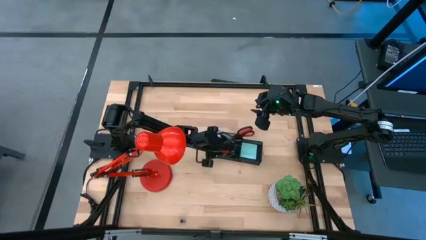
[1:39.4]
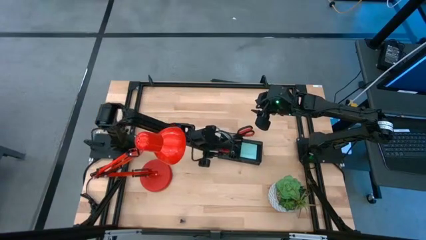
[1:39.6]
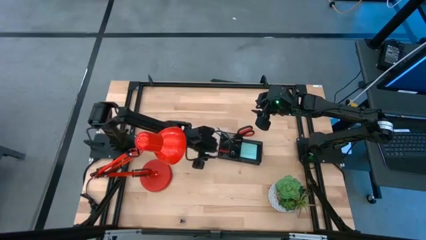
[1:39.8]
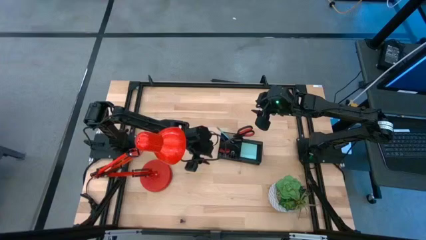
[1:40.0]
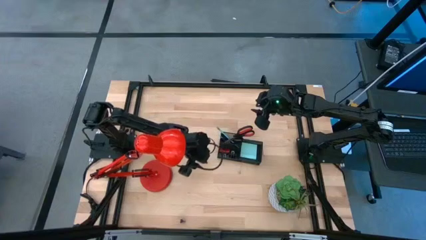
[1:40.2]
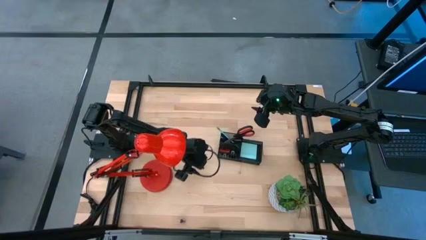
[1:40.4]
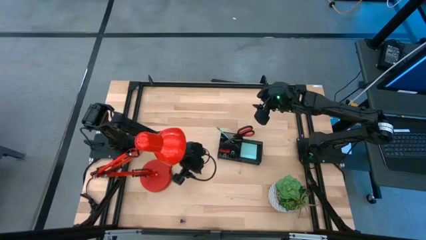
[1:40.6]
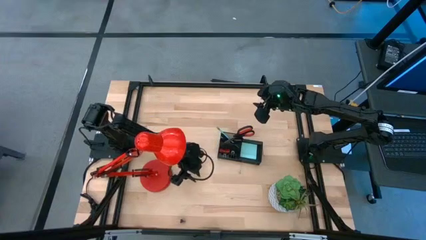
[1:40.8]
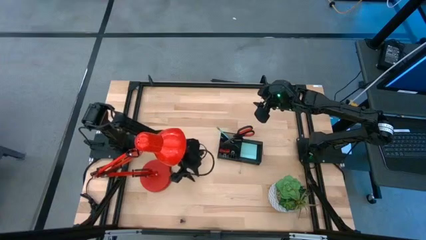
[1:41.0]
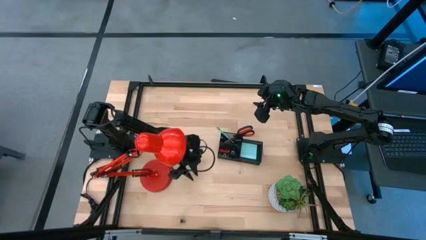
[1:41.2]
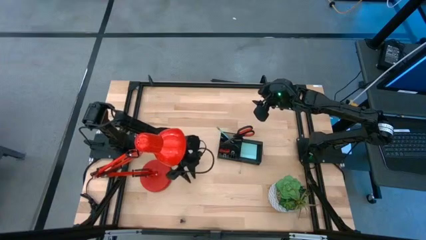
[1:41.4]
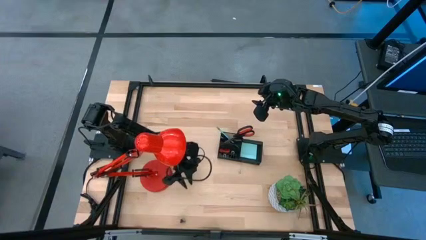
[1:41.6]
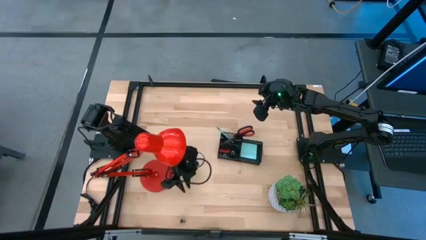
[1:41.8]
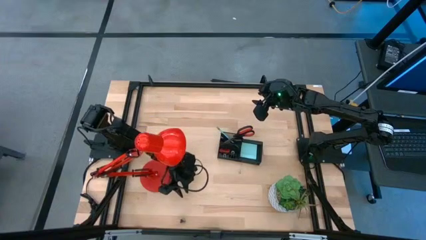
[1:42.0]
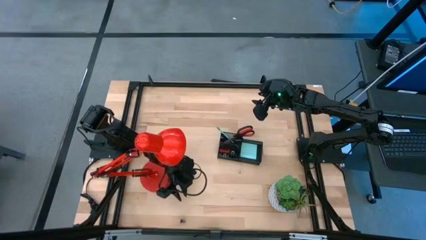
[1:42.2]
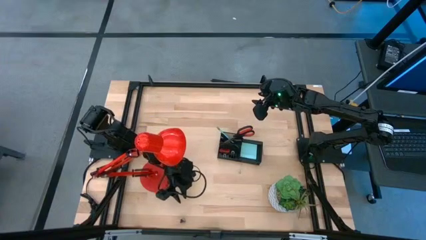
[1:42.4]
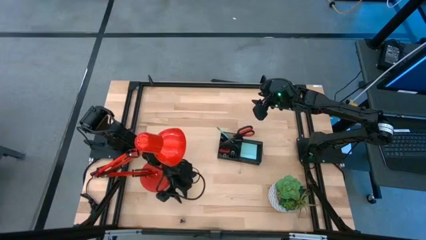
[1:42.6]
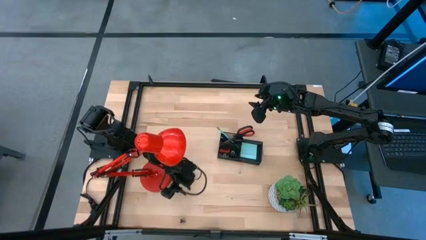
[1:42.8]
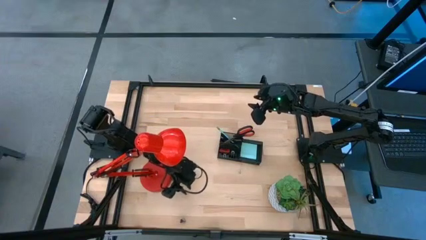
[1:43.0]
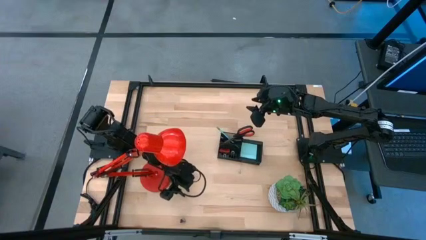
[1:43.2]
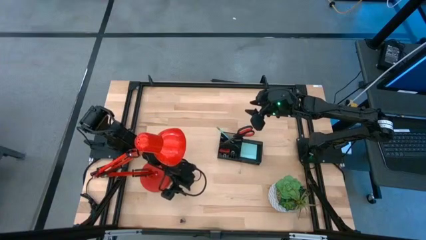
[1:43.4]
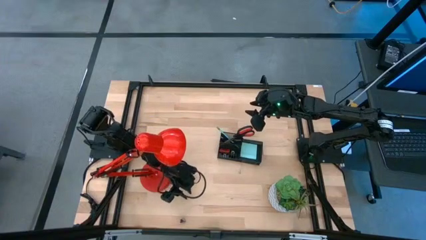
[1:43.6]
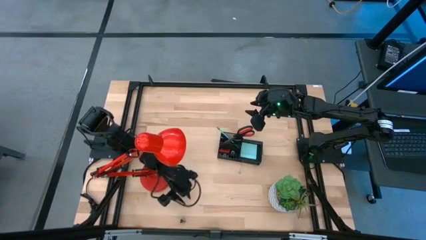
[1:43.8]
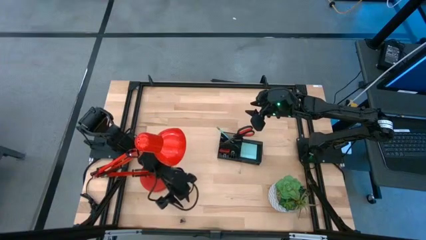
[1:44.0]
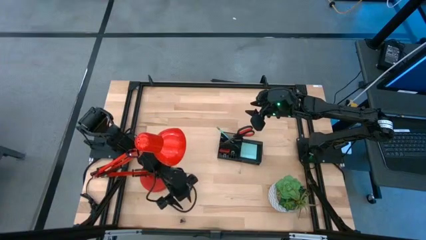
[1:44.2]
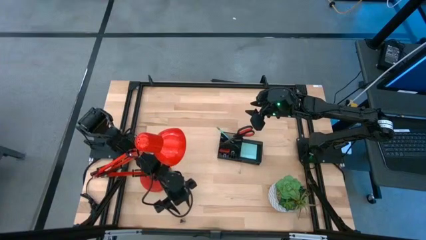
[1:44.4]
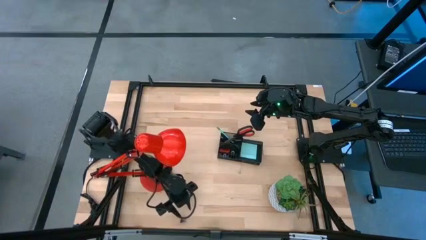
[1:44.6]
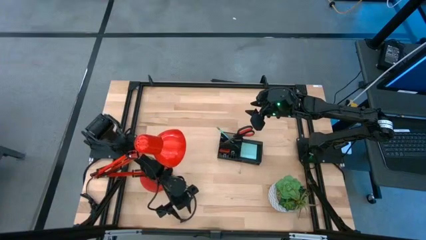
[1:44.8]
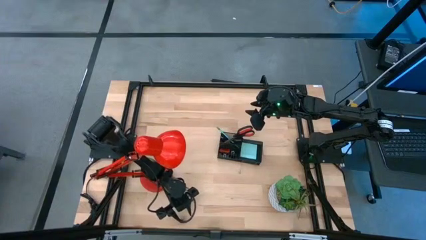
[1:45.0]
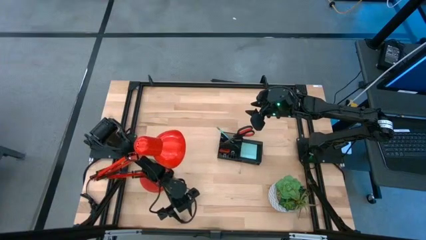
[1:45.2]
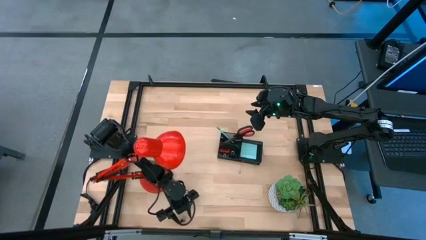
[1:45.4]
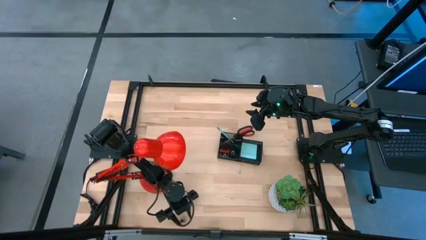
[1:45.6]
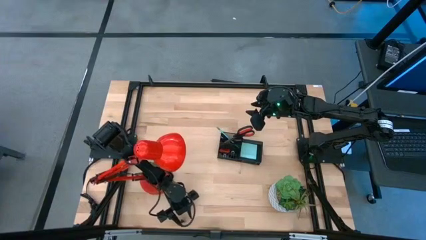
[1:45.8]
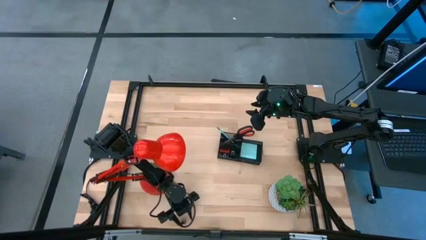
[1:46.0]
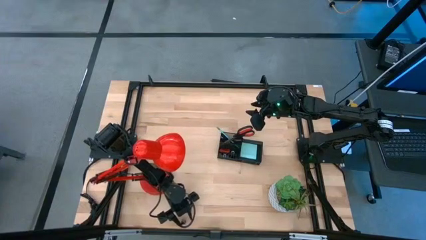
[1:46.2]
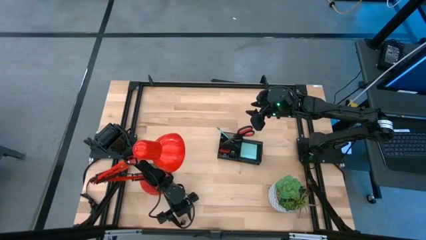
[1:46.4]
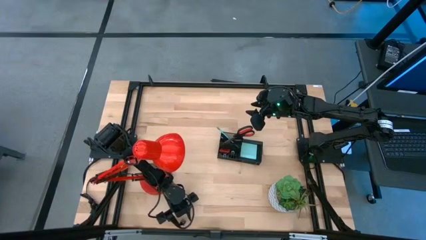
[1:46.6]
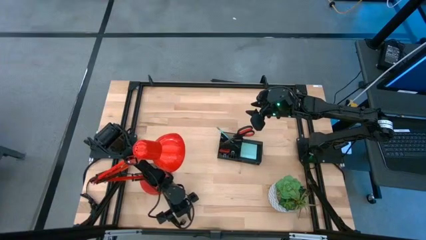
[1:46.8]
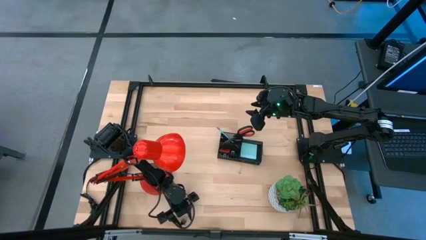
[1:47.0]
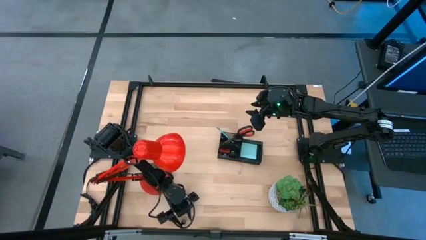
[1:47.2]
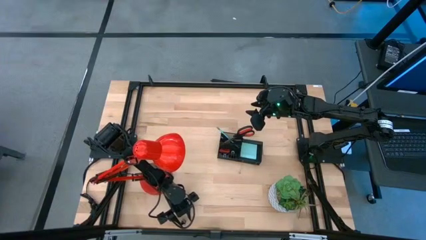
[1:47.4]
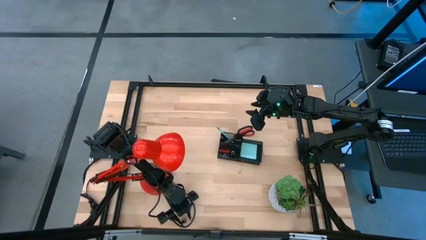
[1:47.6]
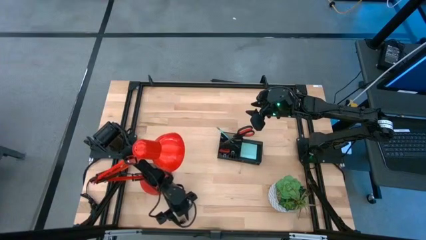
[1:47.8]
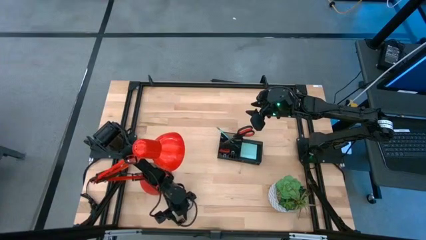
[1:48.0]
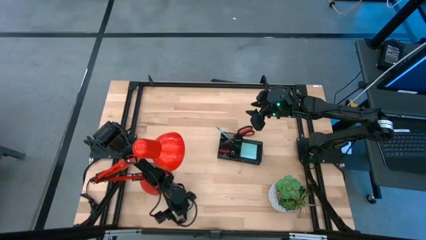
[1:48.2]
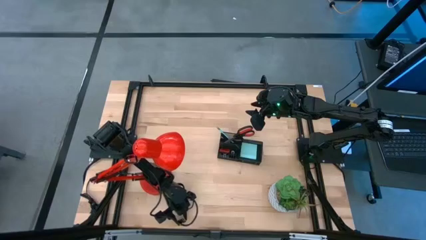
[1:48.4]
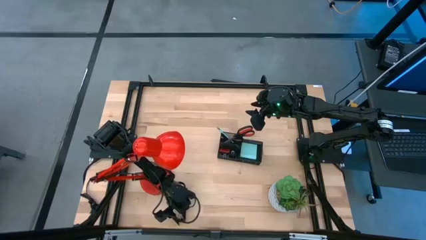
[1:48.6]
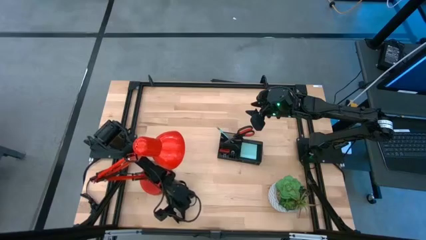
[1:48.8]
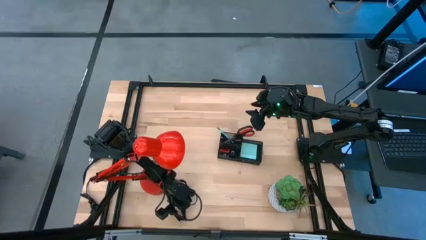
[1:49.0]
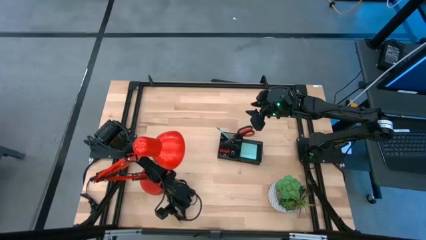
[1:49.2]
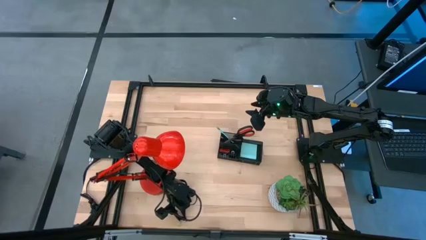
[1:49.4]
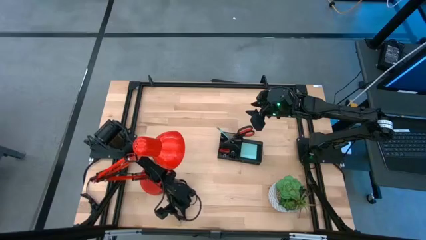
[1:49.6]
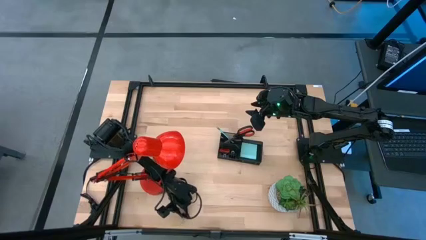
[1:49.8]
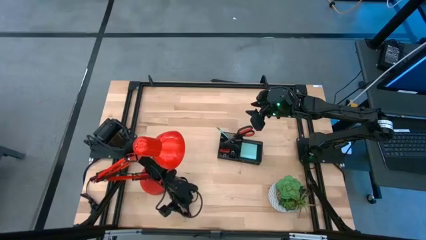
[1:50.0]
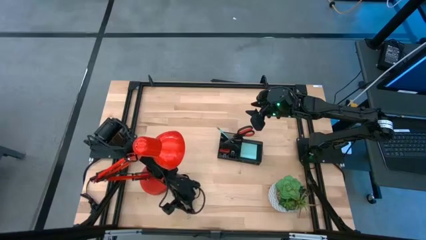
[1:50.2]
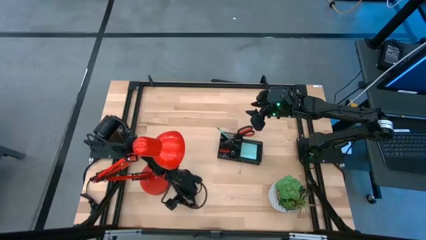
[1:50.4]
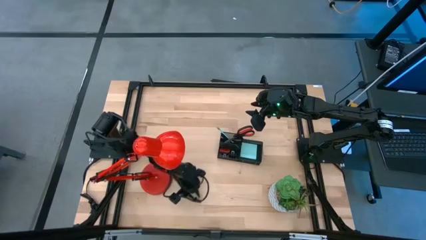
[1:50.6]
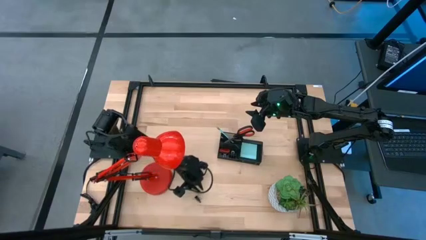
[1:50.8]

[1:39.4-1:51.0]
Task: Pick and place office supplies into organizer
Put the black binder clip into the black desk organizer

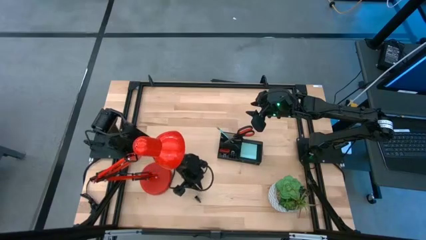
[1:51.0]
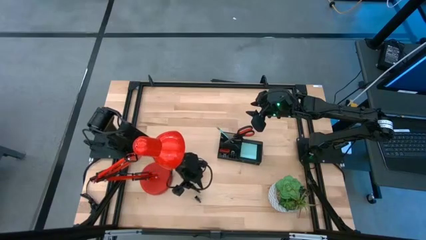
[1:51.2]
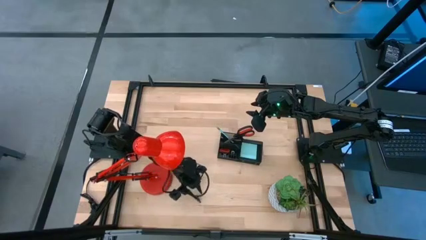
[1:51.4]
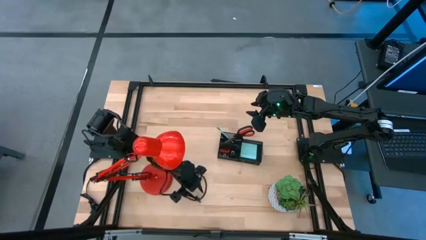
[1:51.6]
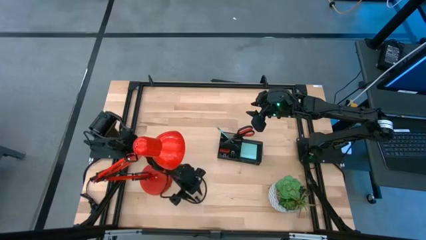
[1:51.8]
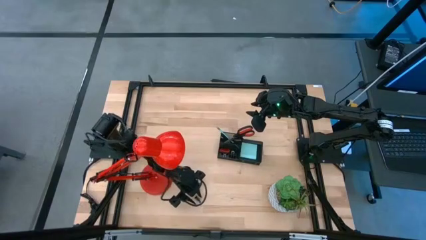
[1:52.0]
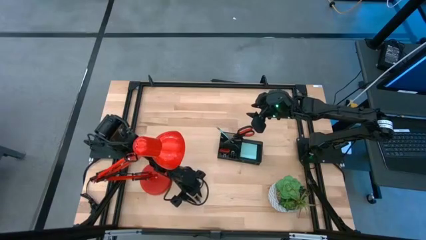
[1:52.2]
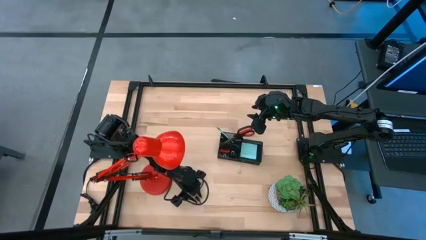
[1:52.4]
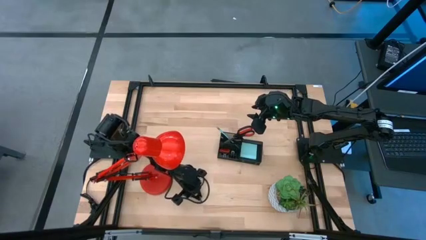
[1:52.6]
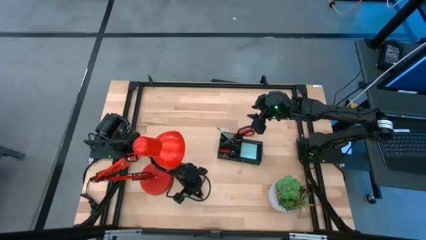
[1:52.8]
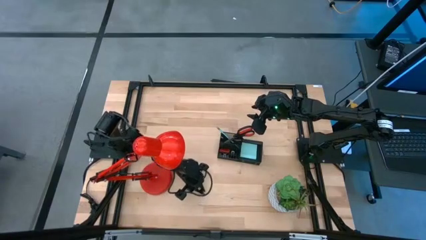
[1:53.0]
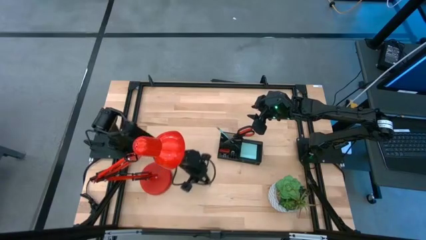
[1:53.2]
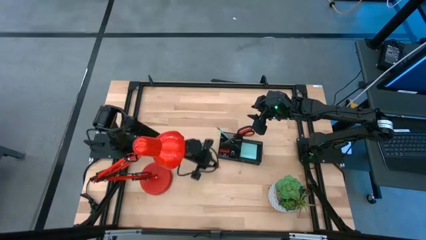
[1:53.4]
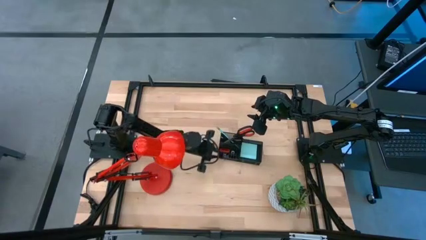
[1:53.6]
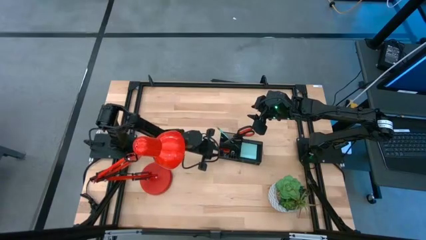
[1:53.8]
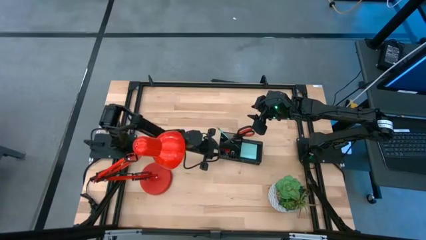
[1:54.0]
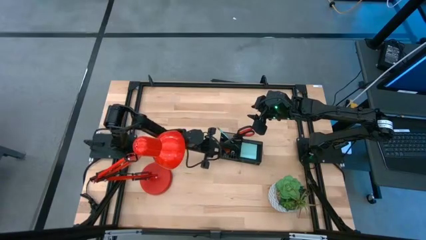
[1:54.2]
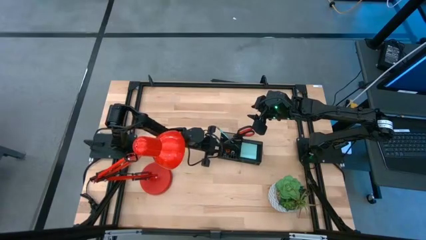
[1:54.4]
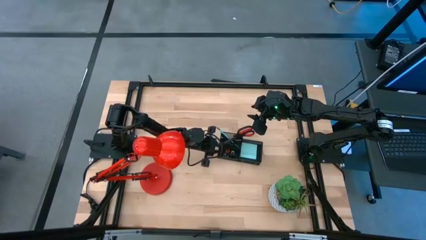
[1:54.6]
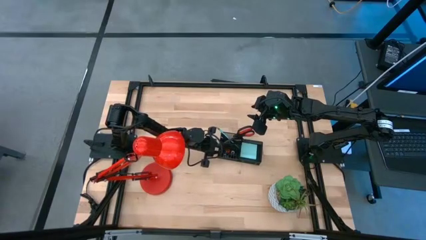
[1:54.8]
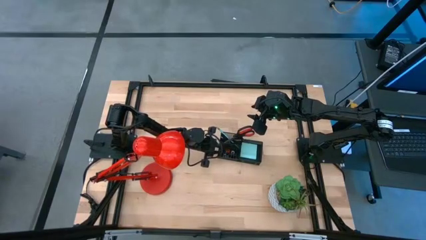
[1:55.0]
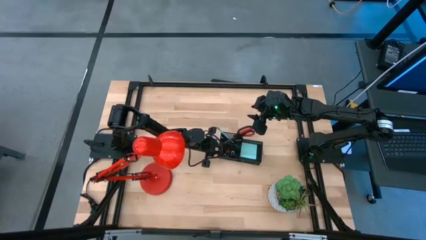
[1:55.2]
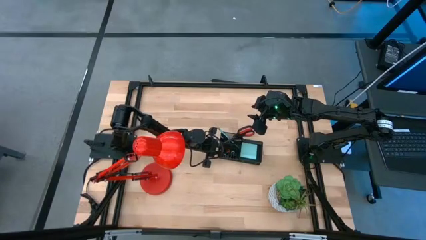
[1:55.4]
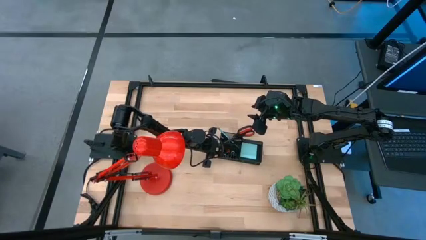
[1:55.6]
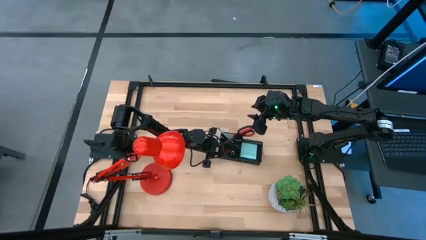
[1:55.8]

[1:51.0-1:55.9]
Put the black binder clip into the black desk organizer
